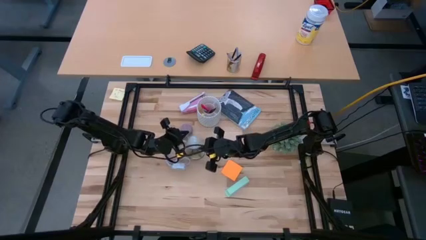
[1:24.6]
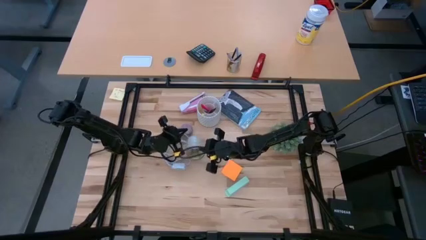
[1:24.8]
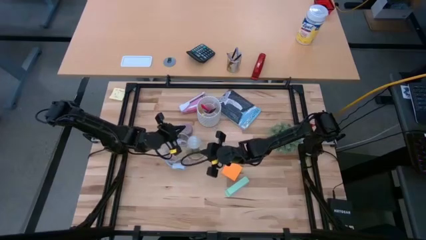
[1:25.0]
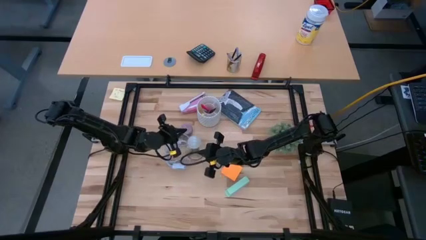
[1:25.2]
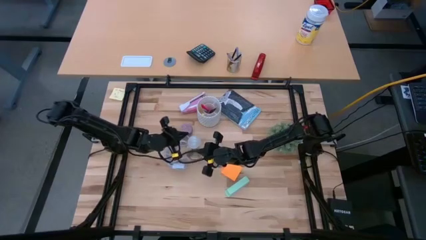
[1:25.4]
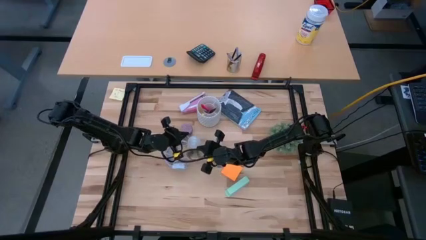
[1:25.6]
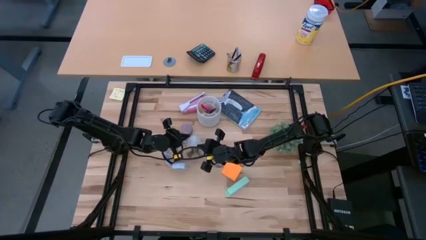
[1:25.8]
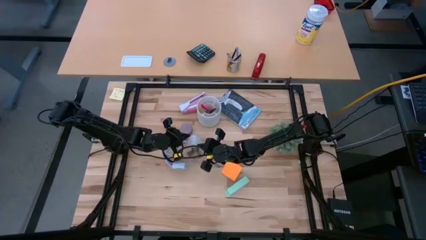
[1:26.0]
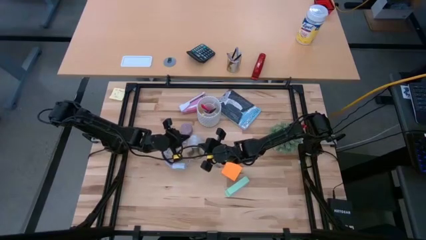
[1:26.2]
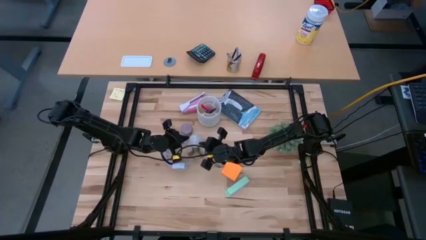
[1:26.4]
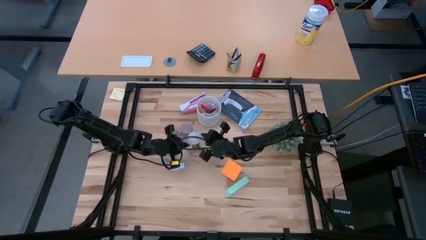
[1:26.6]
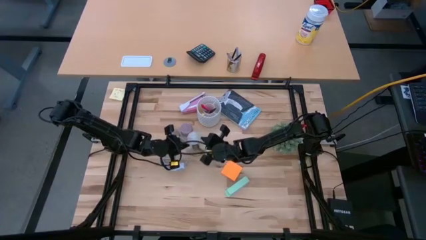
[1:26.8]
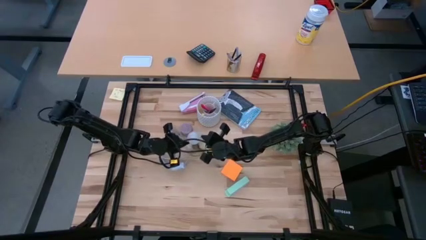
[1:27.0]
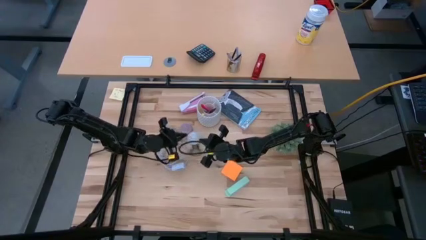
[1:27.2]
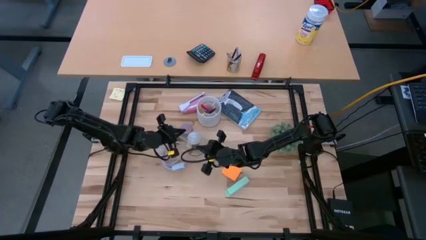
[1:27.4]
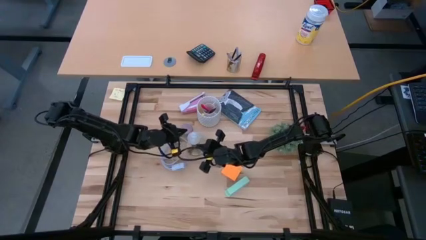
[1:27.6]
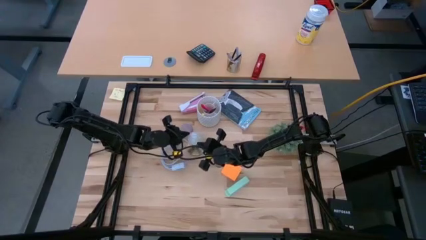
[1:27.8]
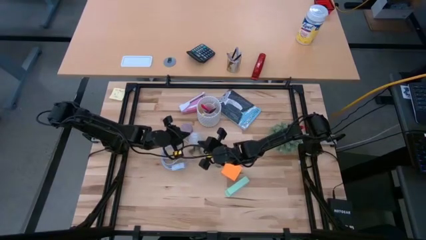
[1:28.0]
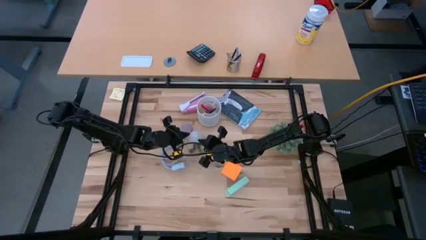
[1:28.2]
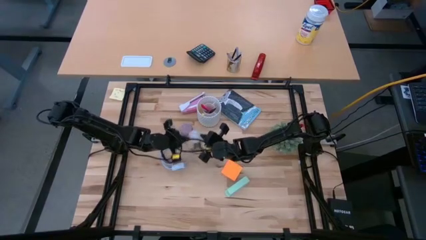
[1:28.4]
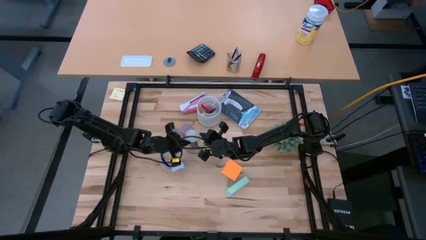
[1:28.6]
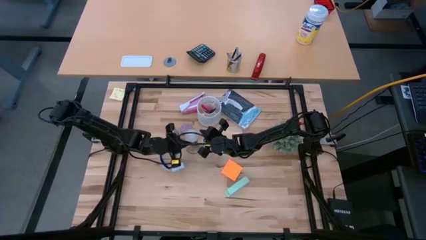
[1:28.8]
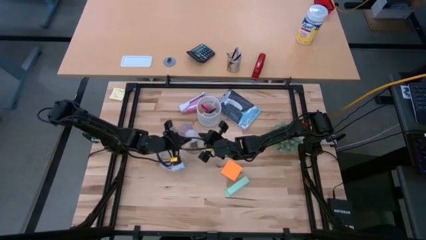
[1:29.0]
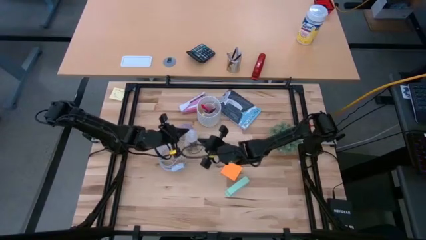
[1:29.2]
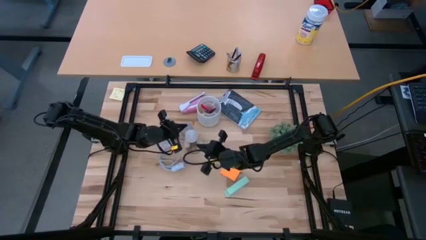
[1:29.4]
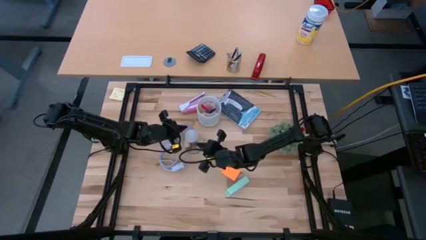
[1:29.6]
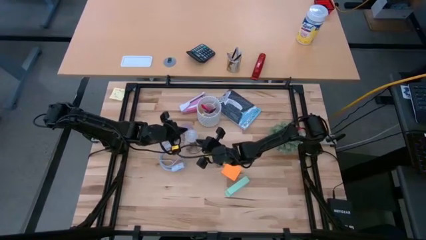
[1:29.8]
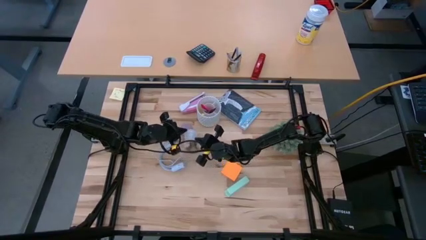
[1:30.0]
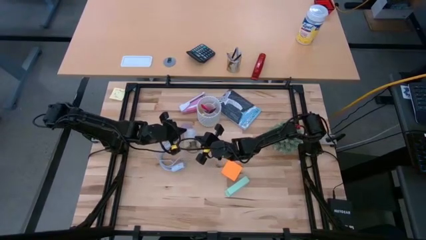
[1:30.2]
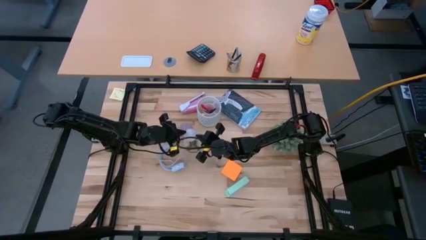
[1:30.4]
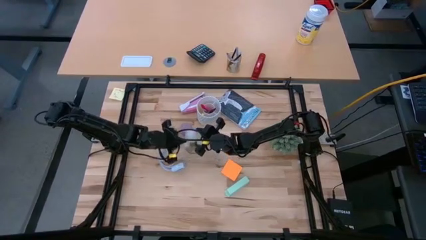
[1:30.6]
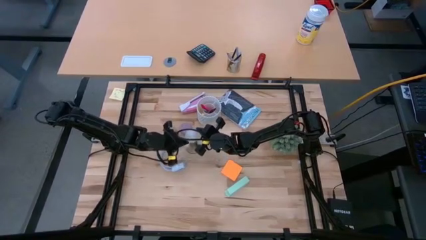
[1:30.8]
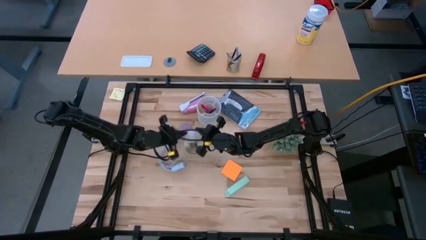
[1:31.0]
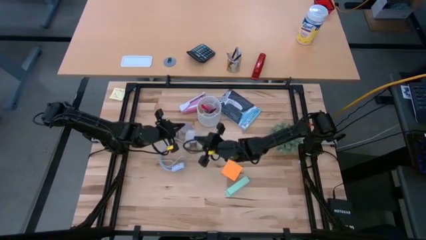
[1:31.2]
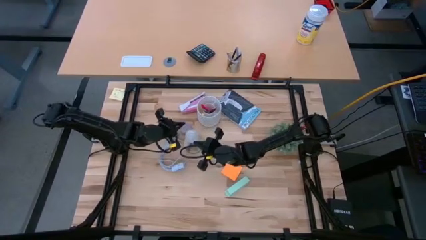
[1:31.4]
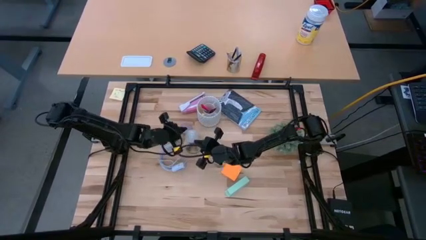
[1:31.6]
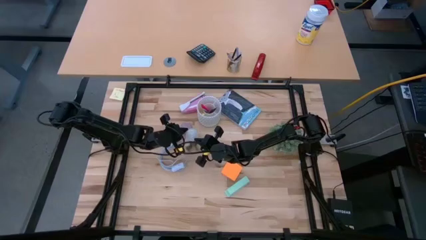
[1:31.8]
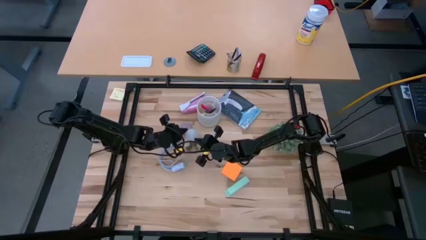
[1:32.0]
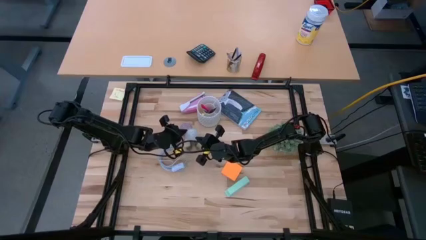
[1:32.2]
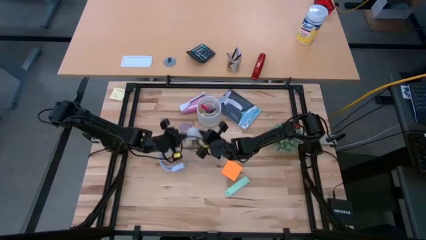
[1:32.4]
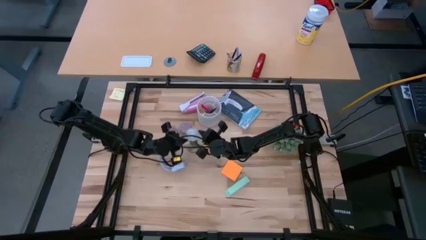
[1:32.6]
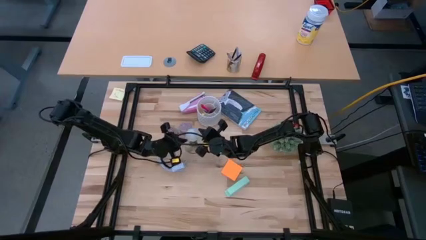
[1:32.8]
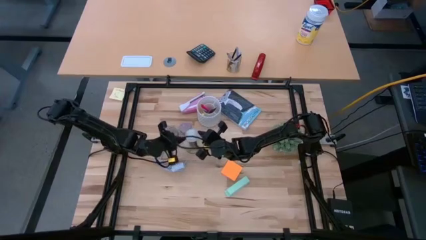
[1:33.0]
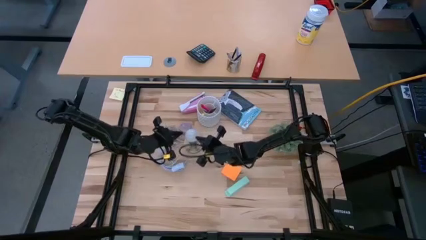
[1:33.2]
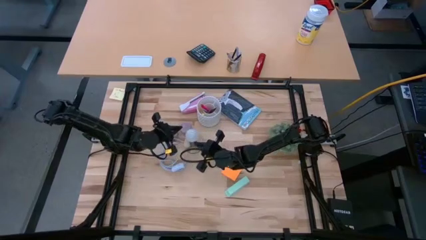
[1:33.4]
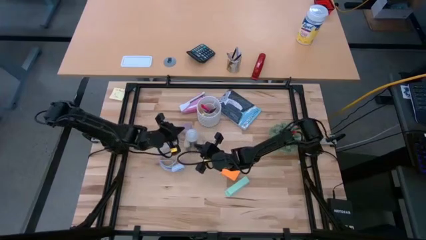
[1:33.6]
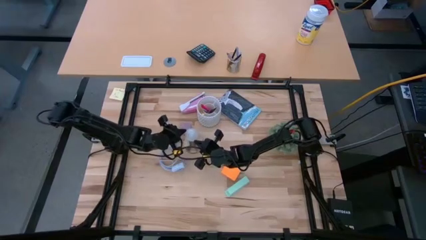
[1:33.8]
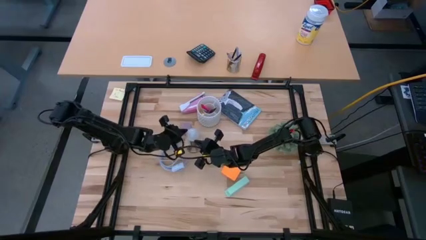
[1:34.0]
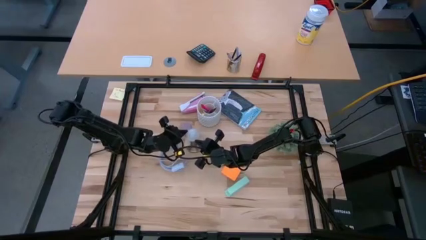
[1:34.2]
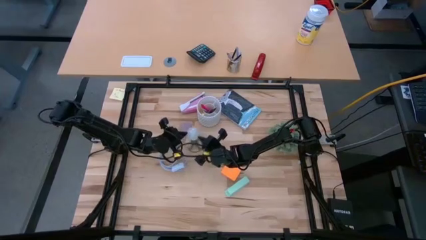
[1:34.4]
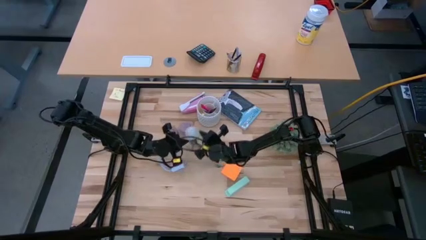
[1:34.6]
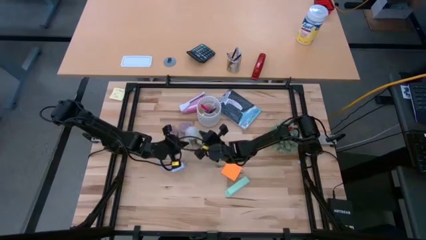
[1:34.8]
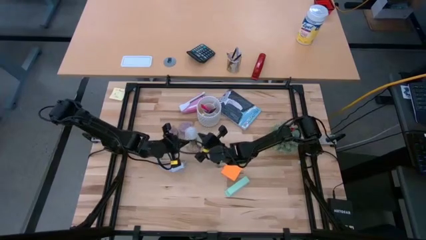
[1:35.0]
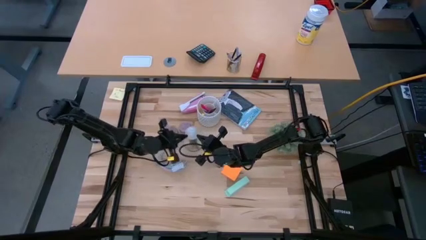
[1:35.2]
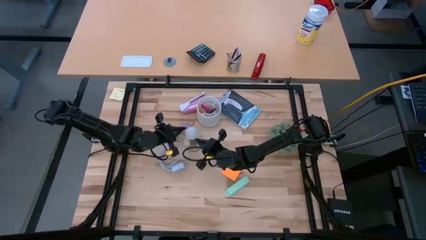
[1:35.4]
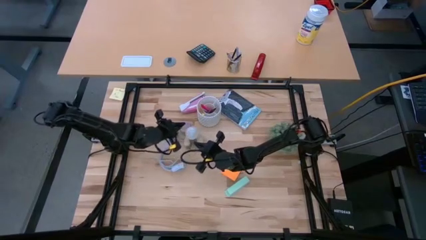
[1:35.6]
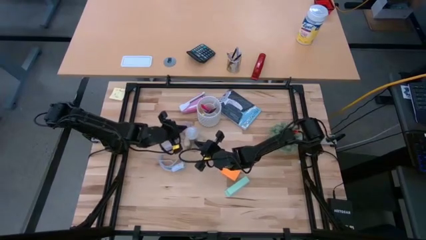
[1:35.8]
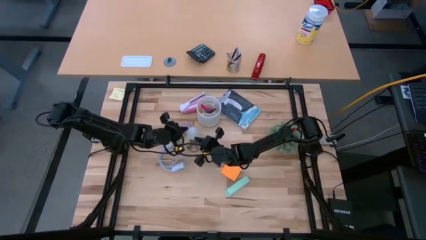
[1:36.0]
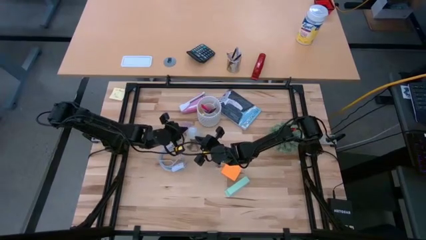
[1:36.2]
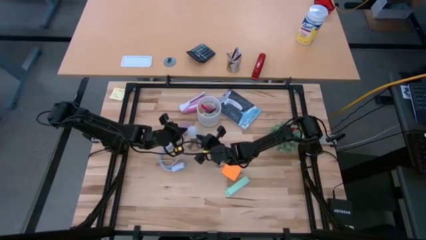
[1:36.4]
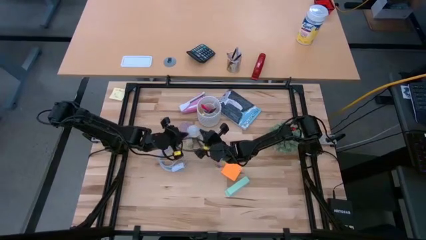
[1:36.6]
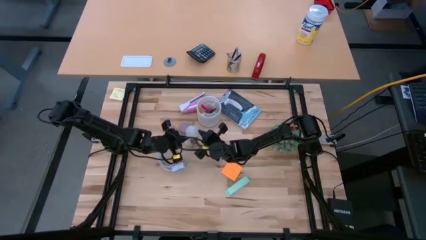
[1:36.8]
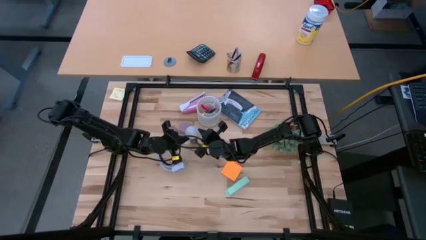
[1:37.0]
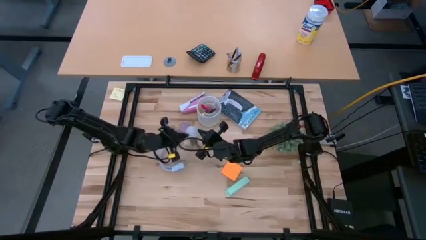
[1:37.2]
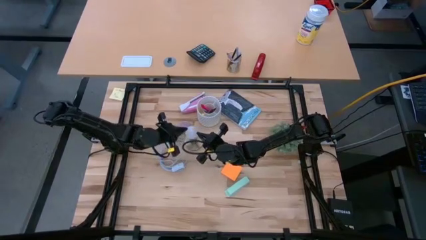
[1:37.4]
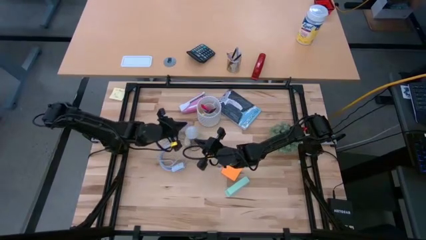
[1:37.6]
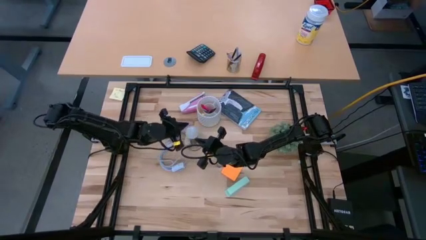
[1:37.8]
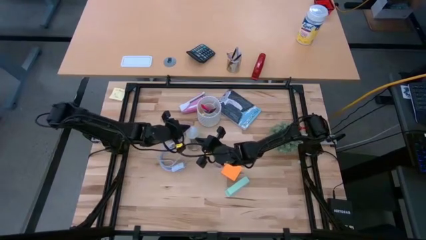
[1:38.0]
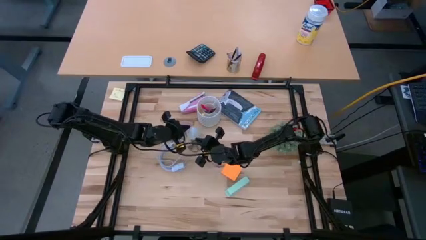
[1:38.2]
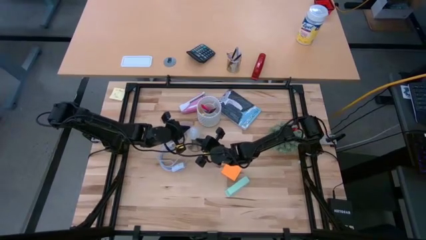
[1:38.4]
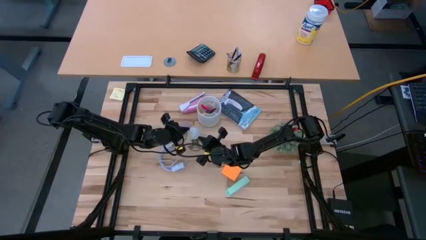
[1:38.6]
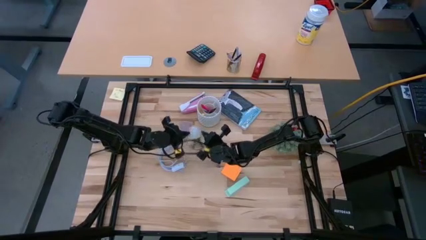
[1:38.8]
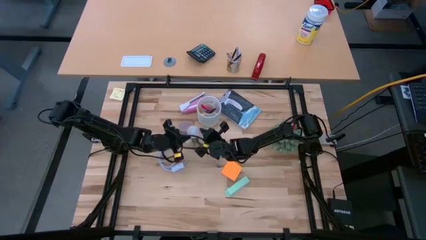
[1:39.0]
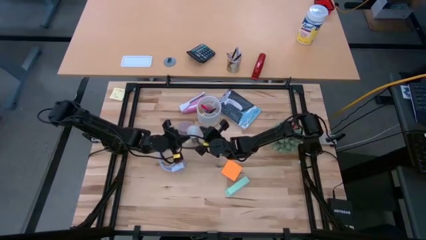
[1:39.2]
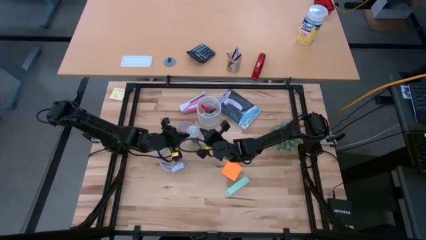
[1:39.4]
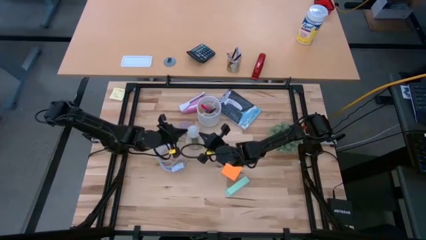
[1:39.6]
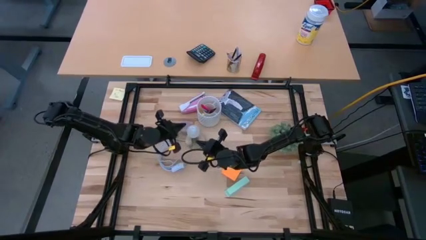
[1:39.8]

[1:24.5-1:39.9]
Task: Screw lightbulb
Remove the lightbulb from the lamp

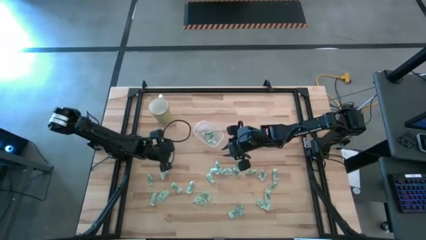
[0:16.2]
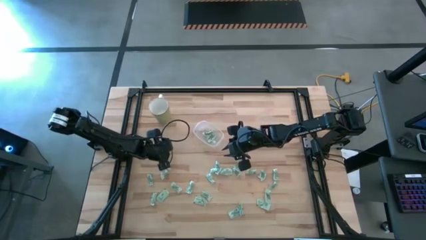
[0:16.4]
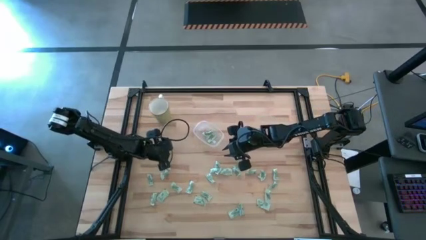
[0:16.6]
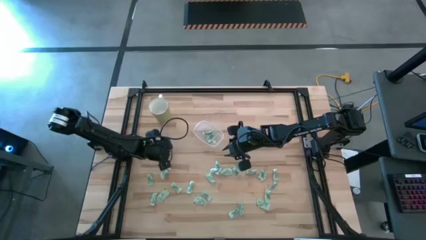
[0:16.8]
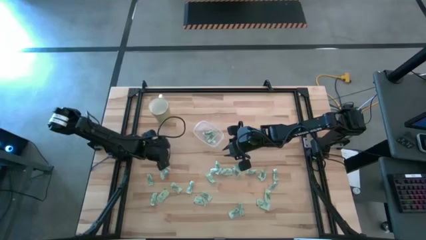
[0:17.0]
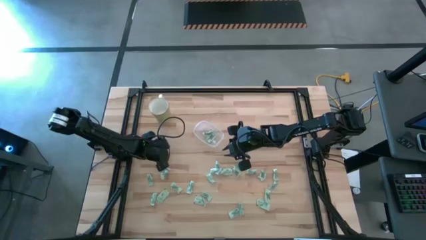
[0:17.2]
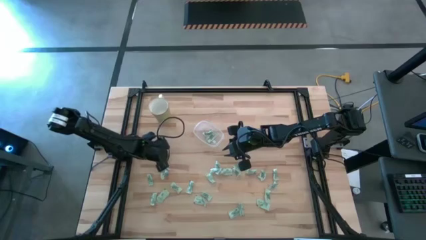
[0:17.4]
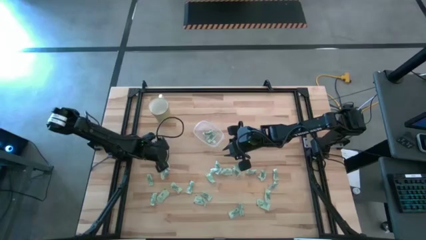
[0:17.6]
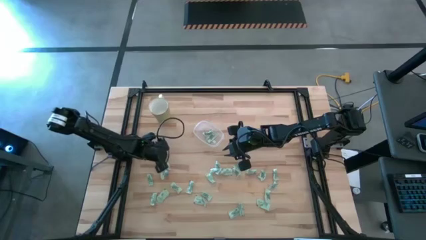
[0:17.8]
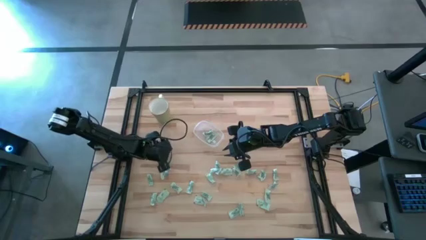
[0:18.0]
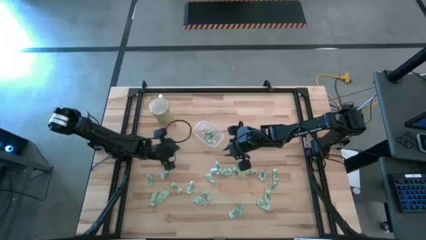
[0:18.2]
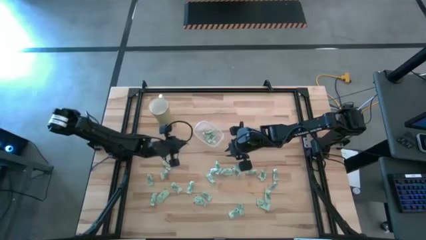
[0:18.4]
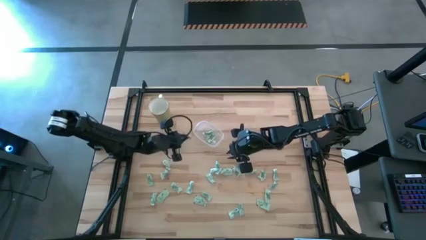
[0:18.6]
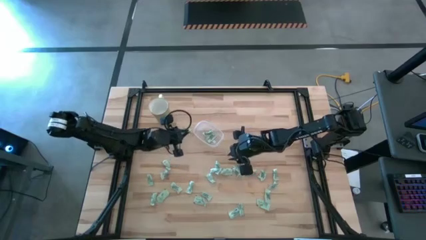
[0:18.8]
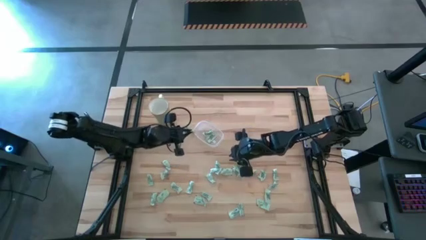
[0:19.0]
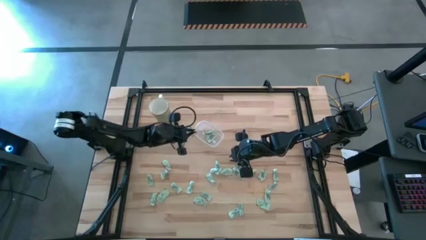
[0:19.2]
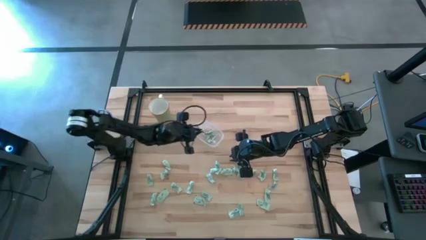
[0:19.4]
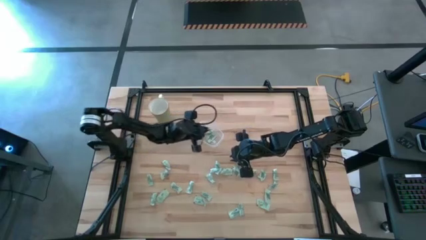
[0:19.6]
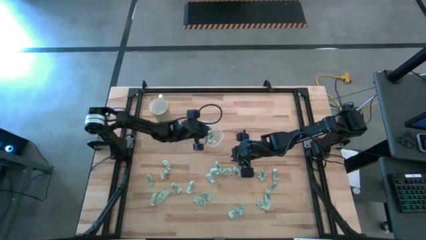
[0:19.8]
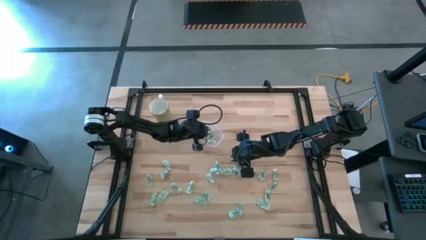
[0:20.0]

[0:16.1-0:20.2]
Task: Pick and place Stevia / Truvia into bins
Put the stevia packet into the transparent container
